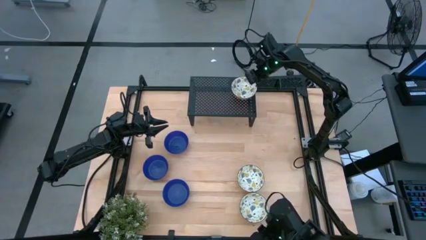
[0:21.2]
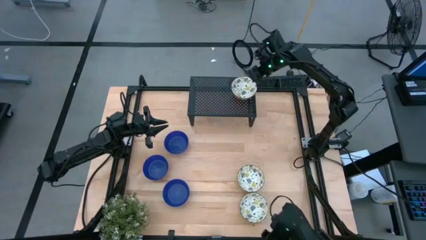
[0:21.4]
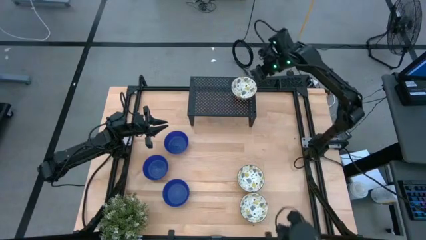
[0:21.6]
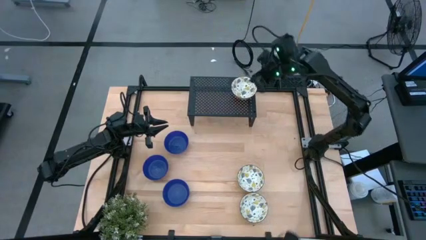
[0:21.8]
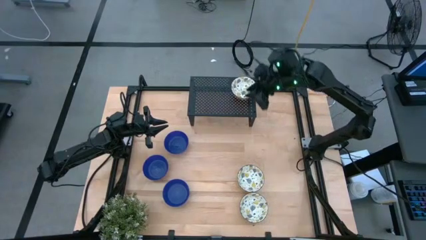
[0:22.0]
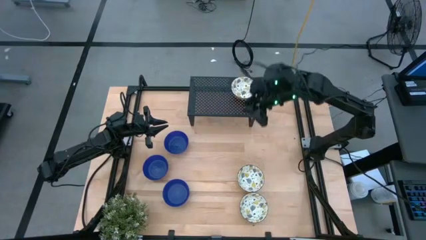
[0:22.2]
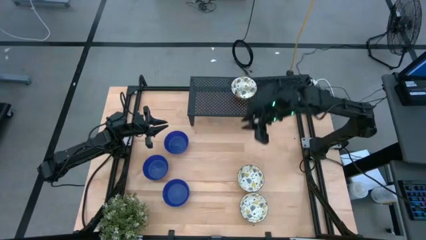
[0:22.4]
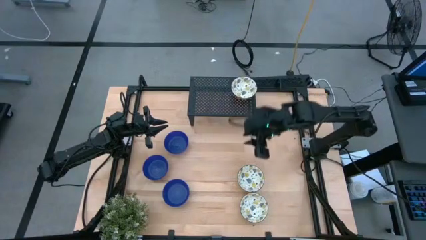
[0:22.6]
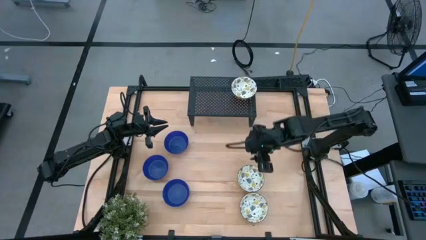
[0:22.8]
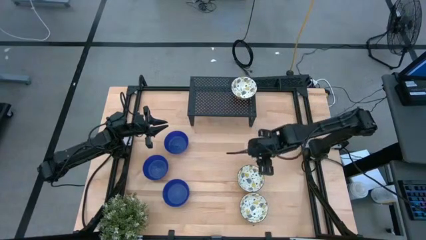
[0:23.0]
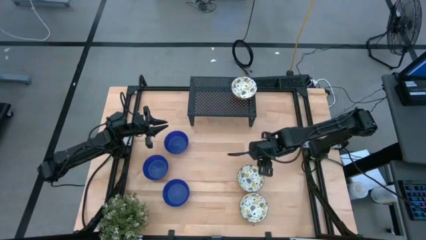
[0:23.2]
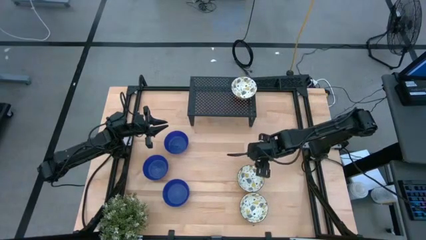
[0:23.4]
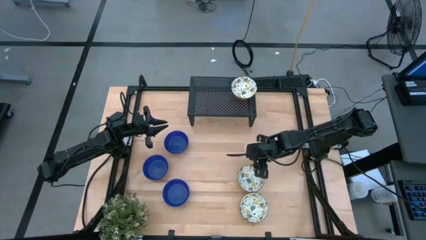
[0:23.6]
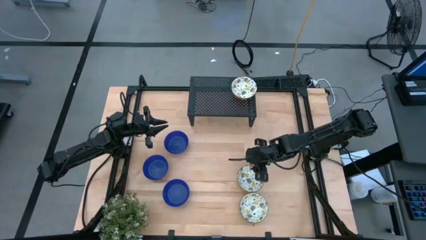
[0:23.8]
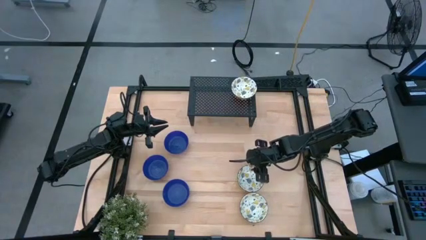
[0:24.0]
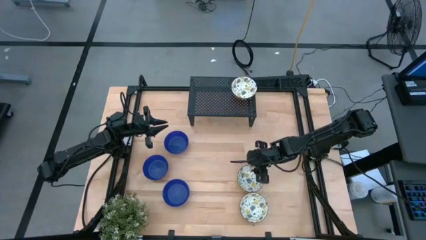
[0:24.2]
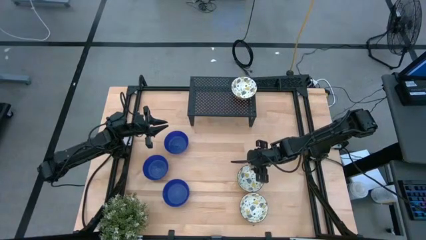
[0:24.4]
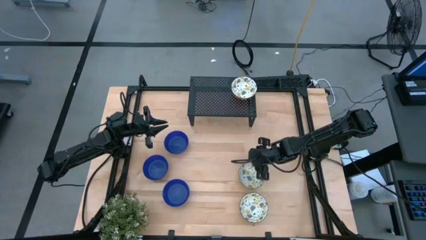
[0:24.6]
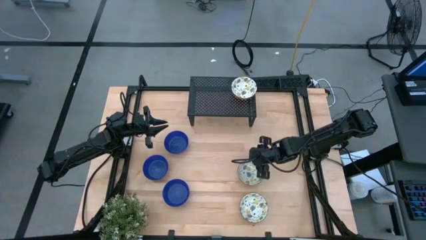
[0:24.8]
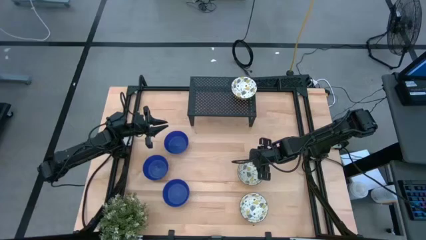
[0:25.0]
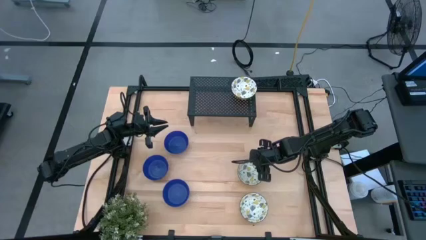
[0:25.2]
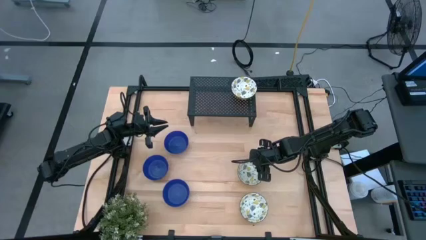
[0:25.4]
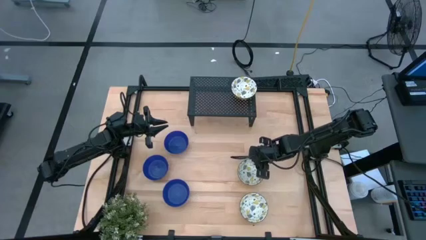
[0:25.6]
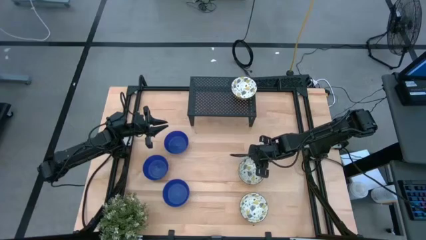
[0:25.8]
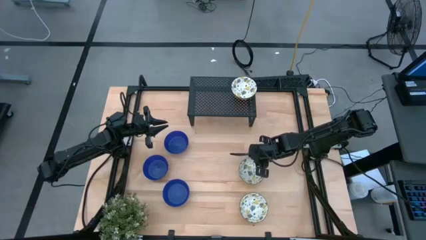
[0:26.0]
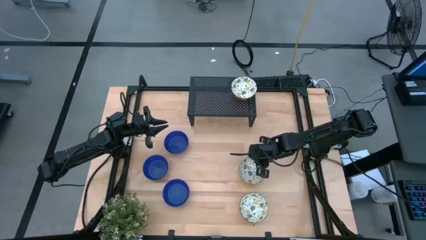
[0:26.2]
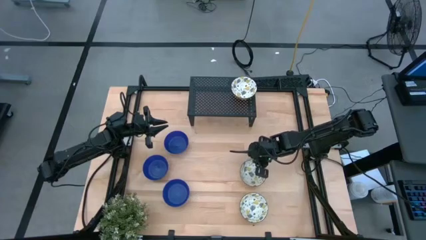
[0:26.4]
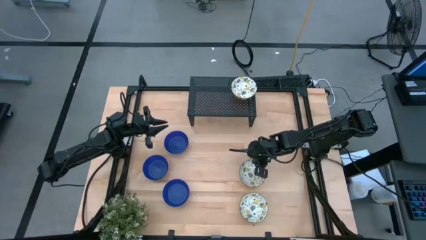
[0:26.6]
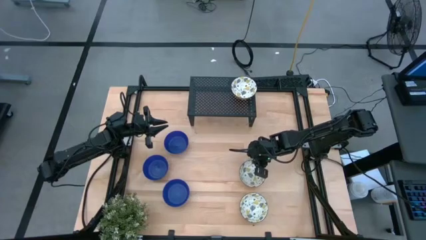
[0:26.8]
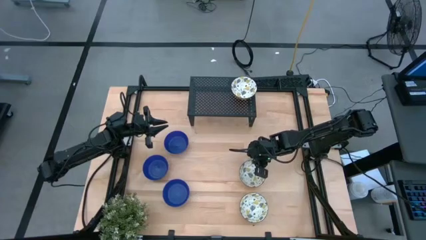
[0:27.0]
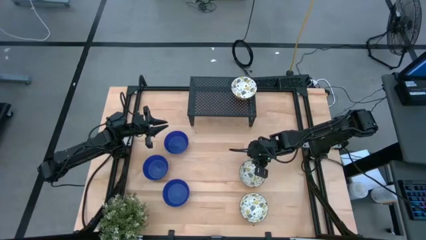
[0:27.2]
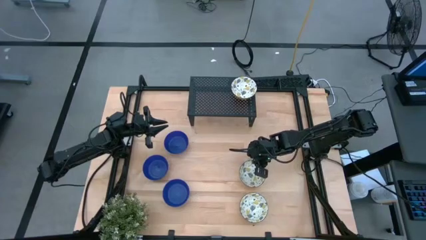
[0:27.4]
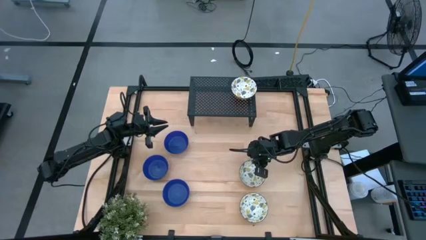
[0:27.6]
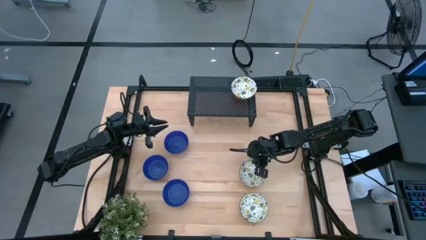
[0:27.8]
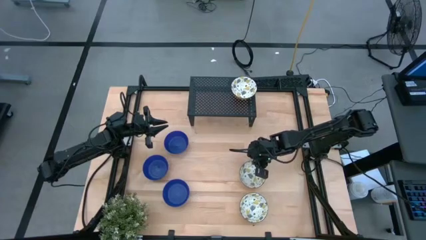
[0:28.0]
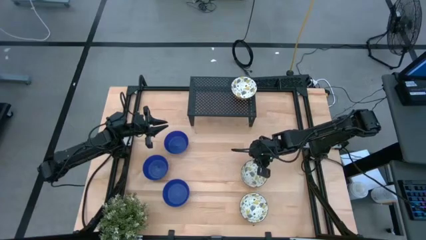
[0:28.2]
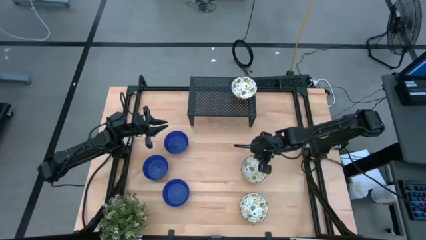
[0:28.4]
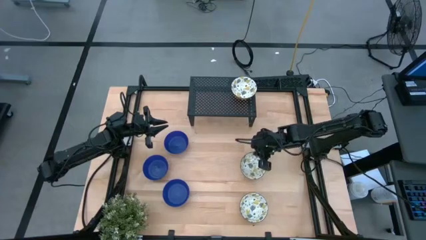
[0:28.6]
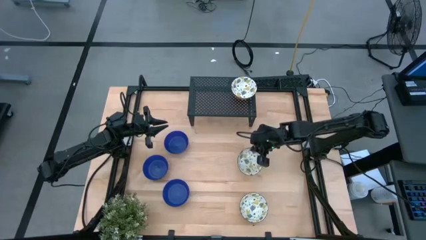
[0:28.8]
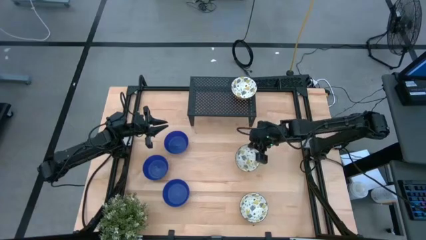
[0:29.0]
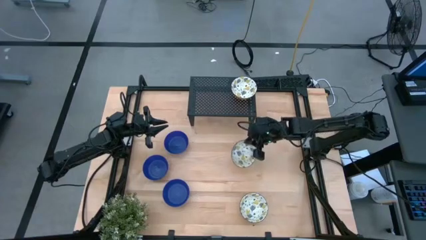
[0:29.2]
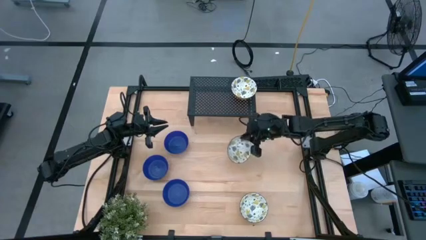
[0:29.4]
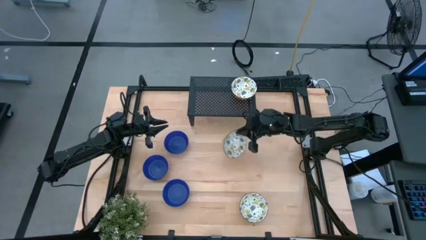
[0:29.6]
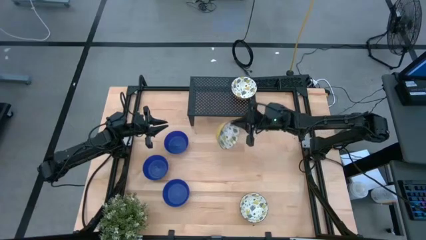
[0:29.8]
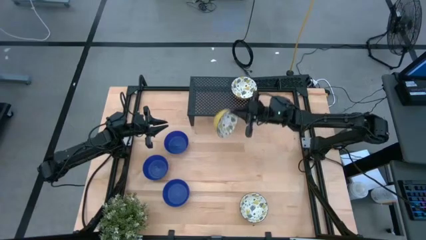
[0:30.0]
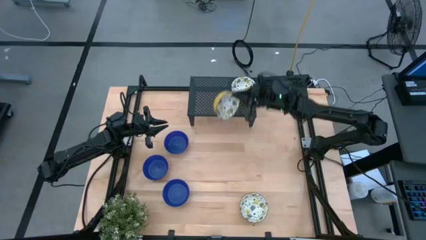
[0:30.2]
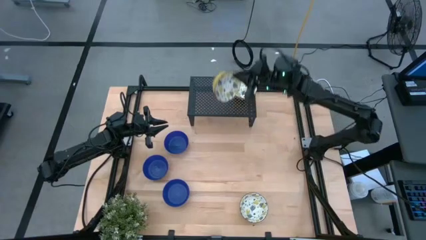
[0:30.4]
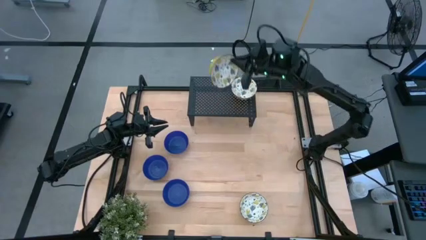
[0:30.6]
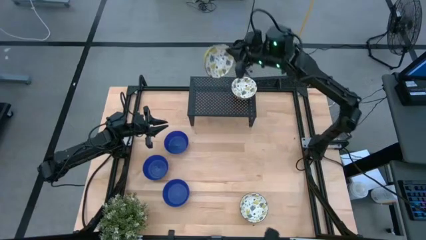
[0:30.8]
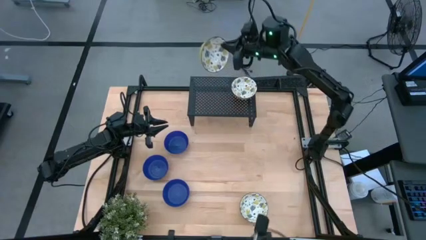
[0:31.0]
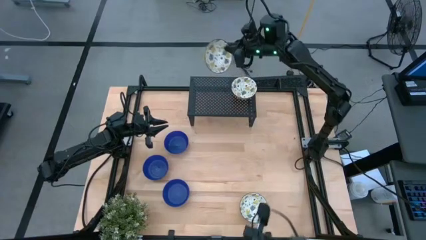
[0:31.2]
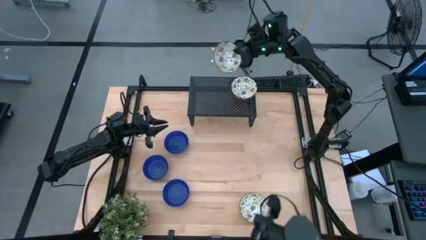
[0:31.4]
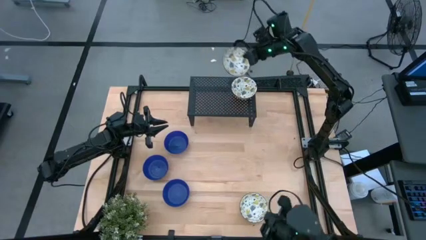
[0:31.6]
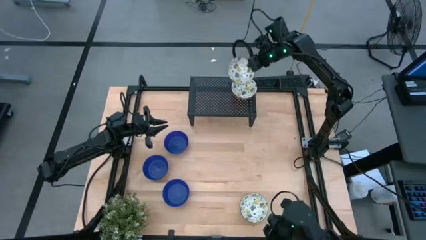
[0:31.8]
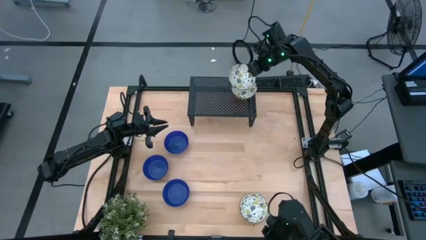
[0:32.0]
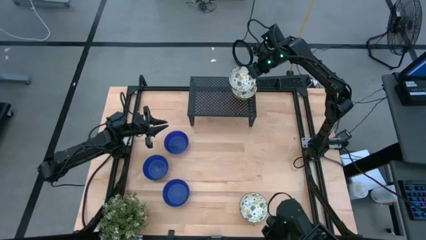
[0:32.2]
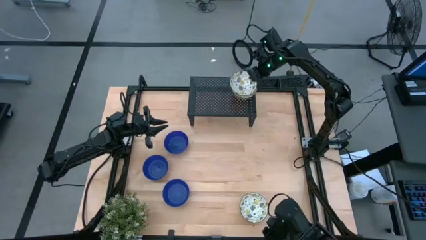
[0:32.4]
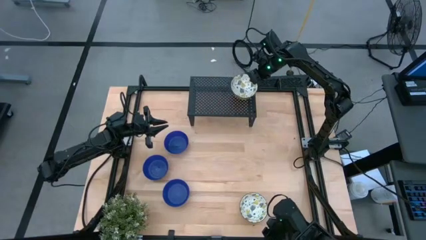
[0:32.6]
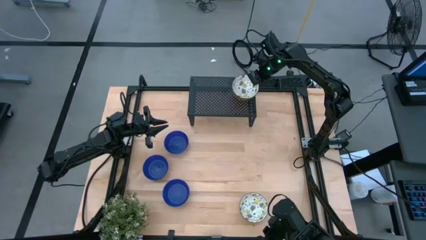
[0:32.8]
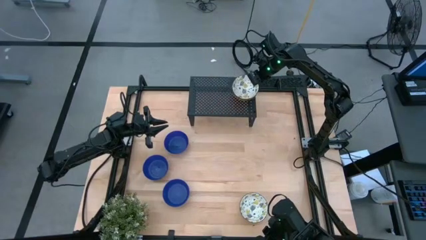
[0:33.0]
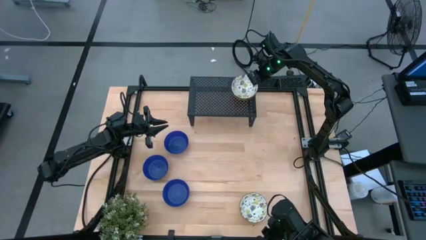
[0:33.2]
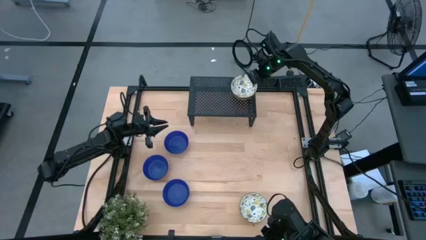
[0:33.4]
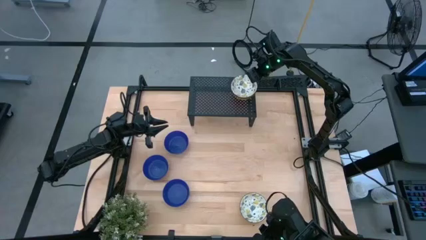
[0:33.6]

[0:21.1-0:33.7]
Task: Pick & Place Mini bowls
Stack the top white patterned bowl on the white patterned bowl on the shelf
